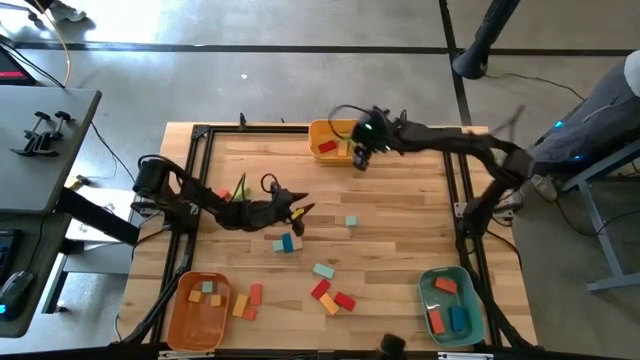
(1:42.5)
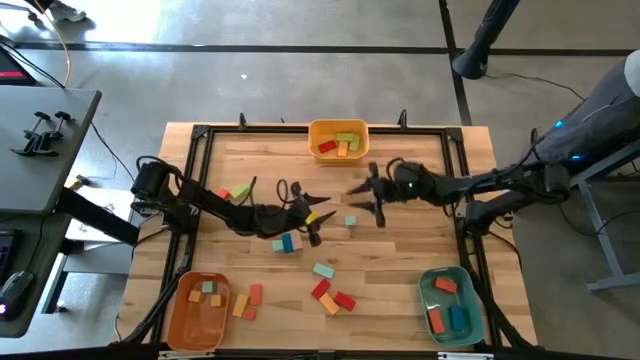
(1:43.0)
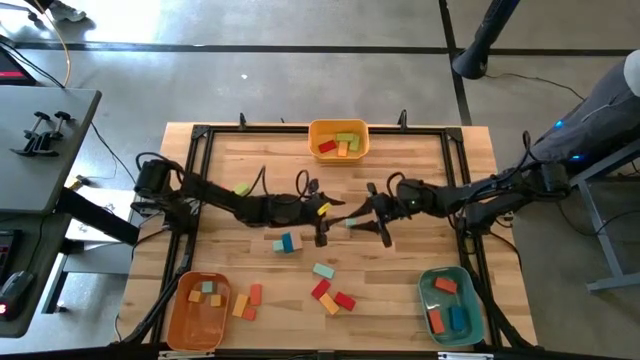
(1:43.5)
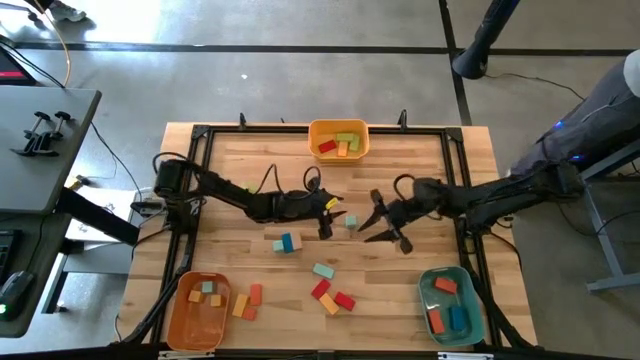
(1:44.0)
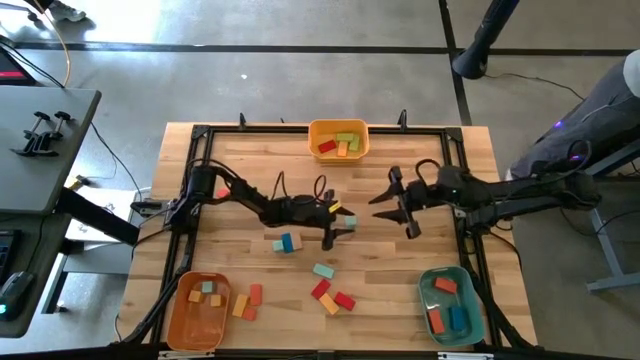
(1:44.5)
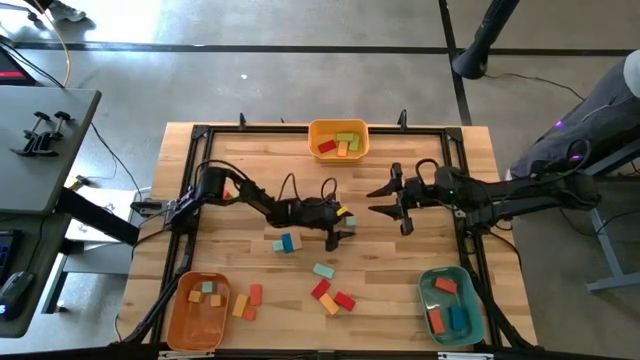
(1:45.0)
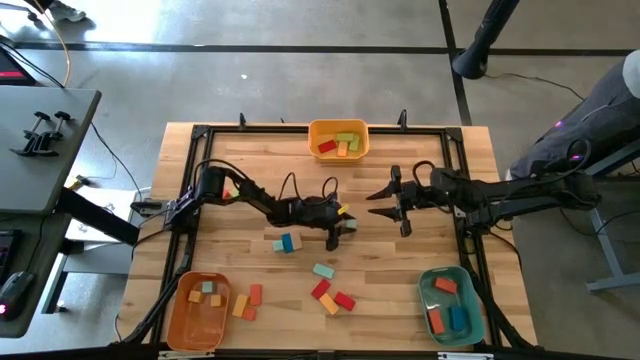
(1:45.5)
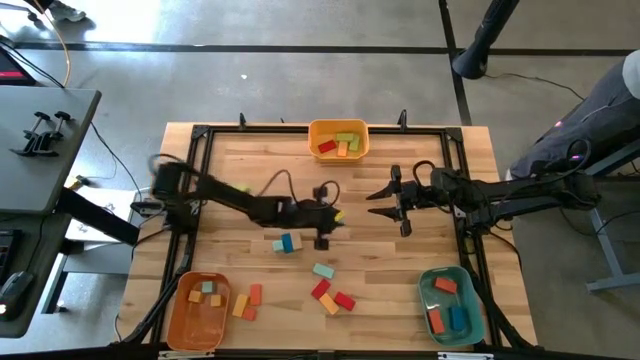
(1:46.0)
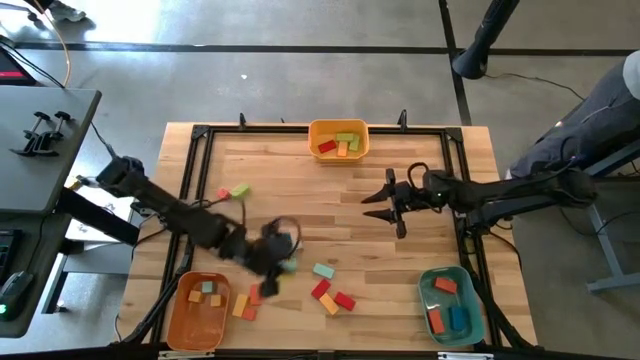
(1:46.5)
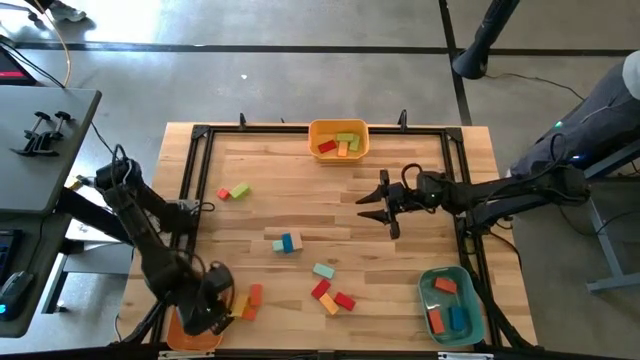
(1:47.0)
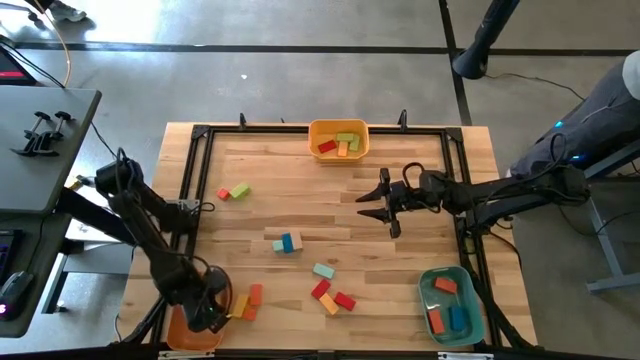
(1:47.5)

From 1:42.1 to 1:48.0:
Task: Sort blocks by size
Put the light blue square block into the orange bin

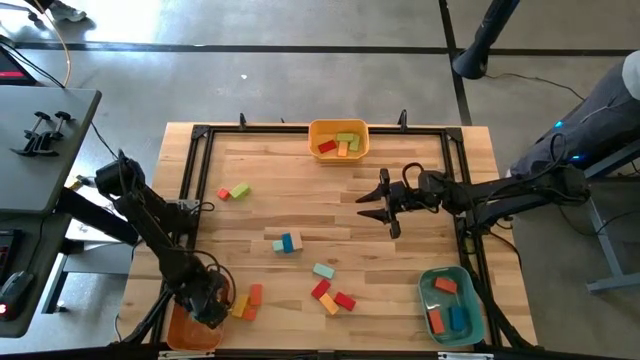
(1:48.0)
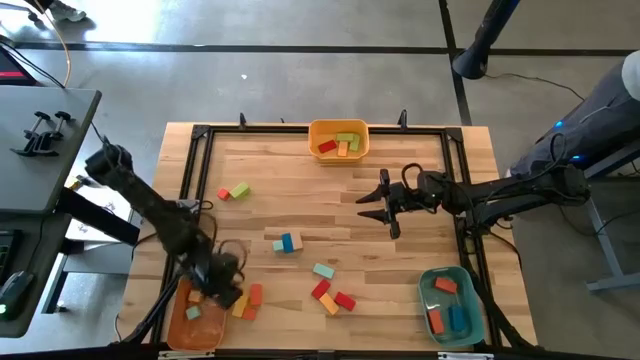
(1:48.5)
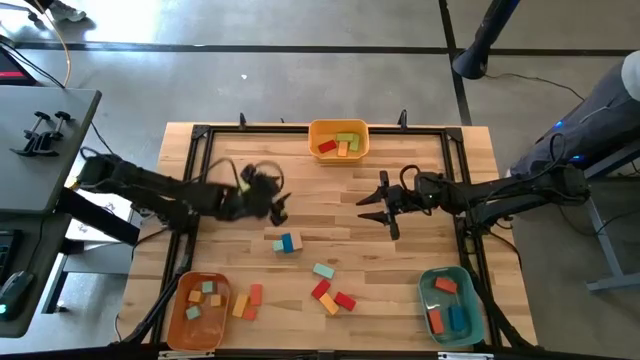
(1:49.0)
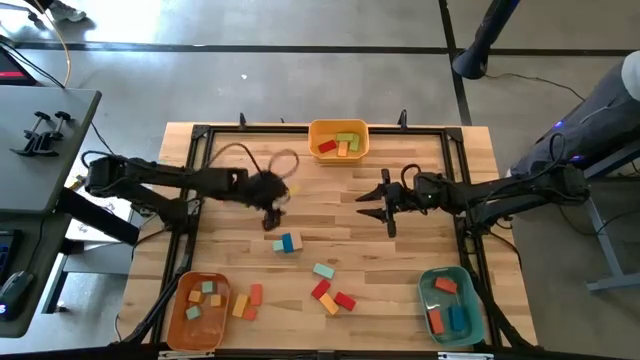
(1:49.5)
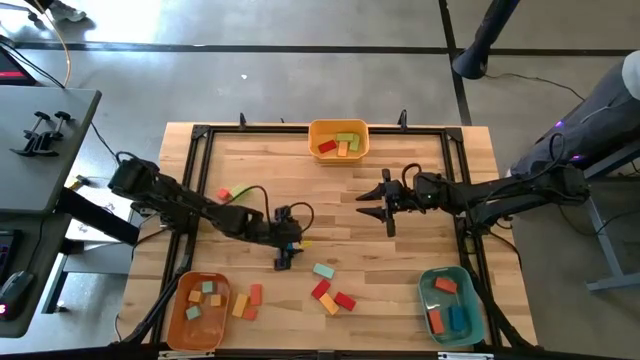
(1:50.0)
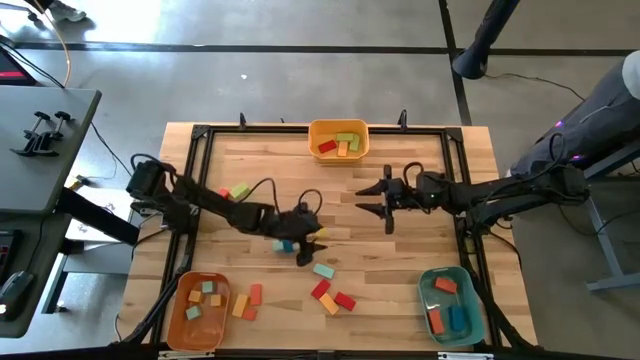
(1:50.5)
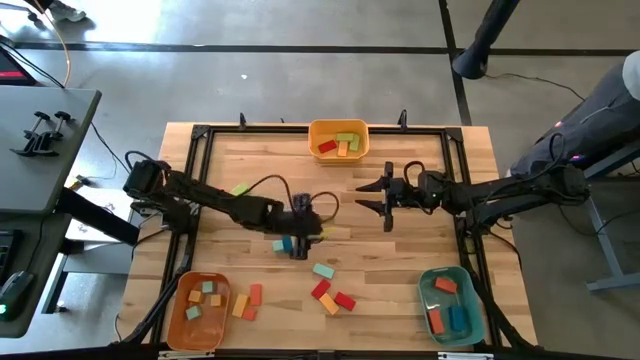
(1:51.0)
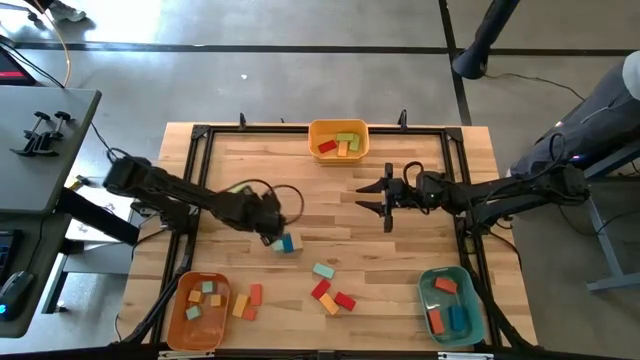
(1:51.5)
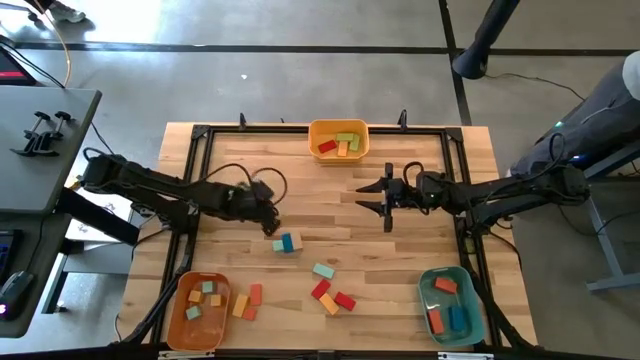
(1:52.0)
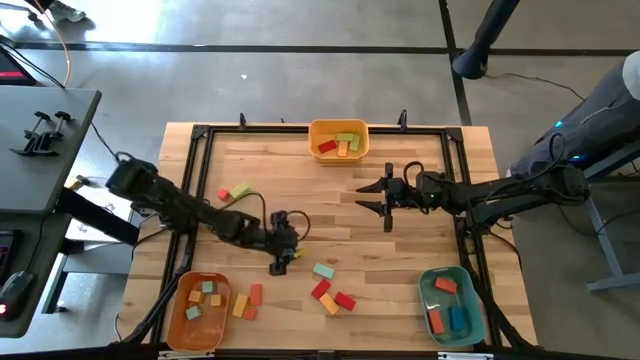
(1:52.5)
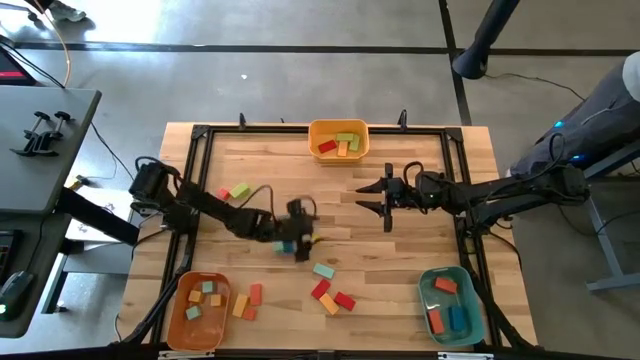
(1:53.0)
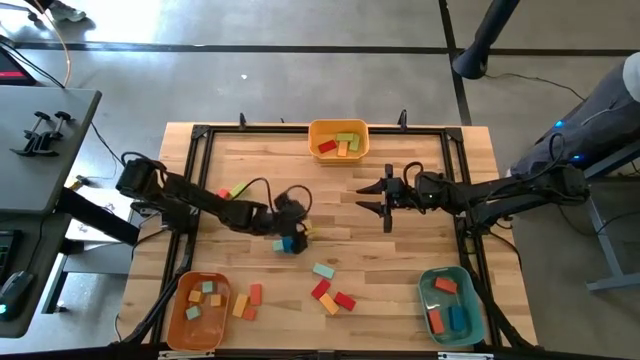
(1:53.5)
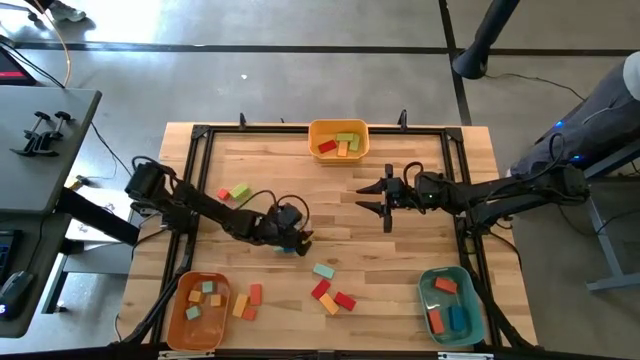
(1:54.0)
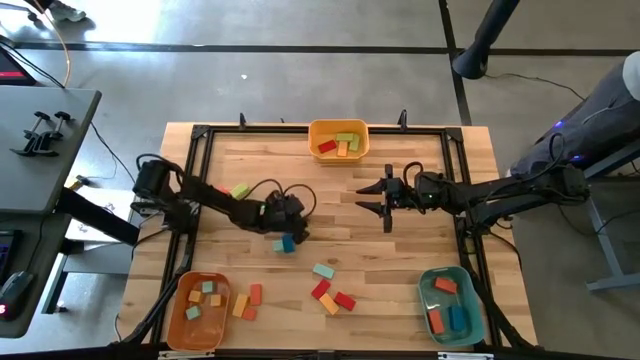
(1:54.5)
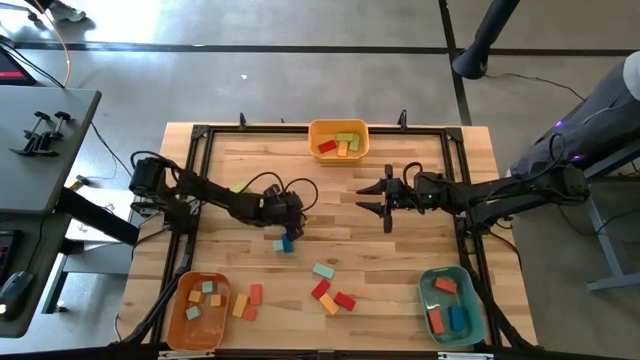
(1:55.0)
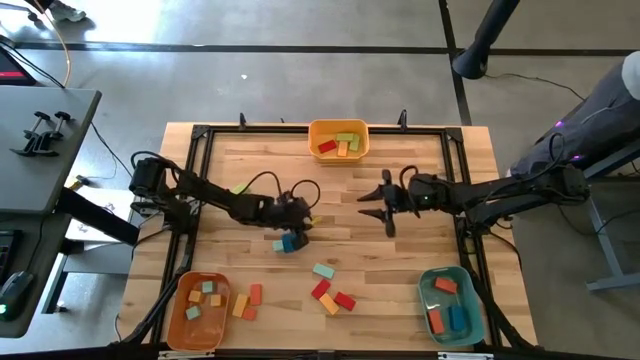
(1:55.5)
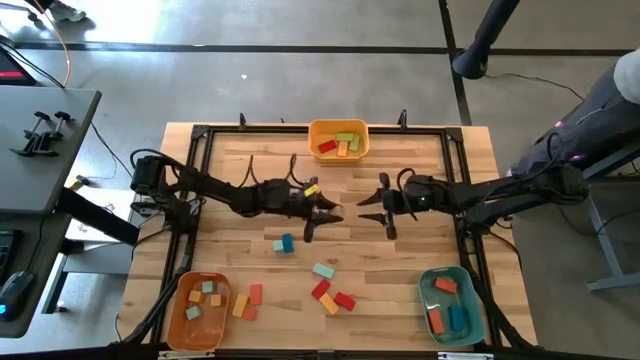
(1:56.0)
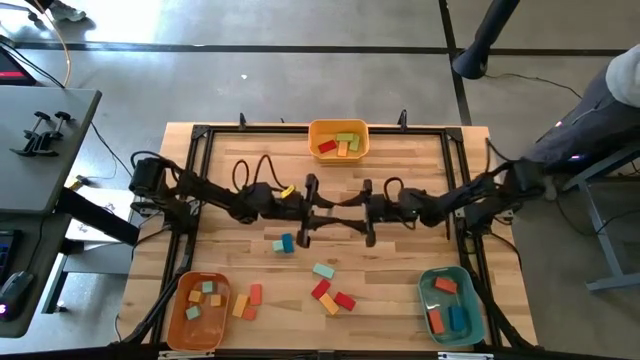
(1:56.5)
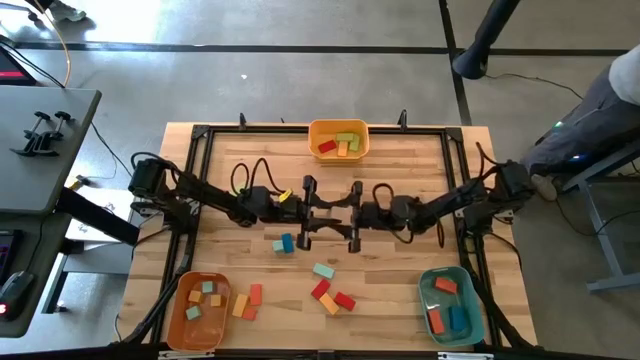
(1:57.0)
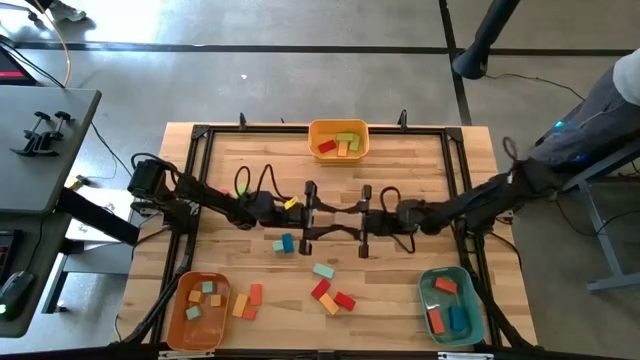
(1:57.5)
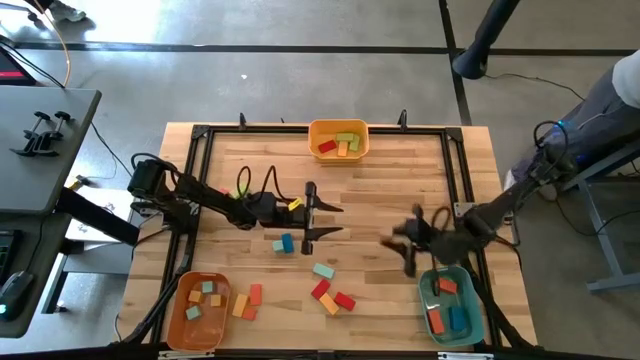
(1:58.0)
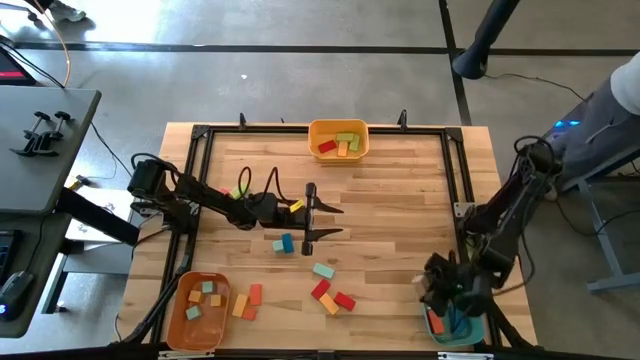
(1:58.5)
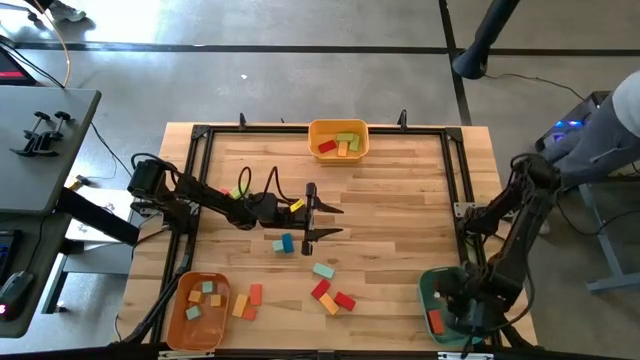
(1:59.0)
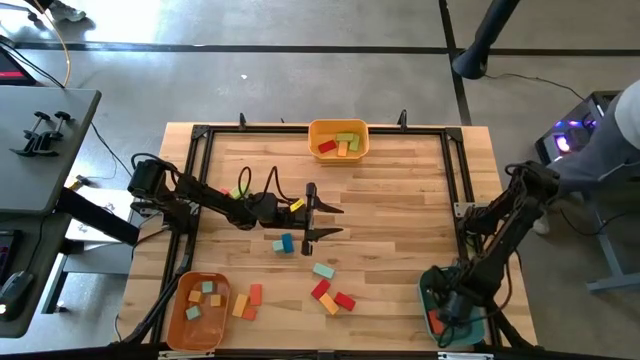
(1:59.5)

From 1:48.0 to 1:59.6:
Put the large brown rectangle block into the green bin

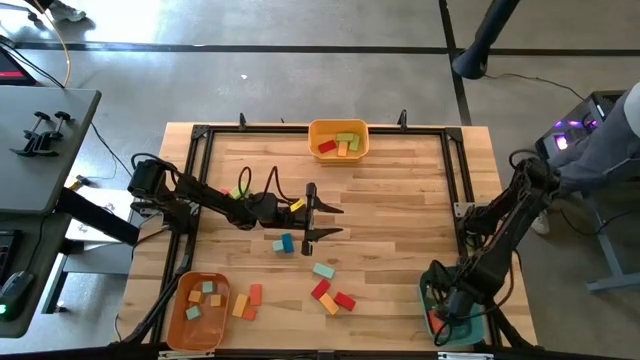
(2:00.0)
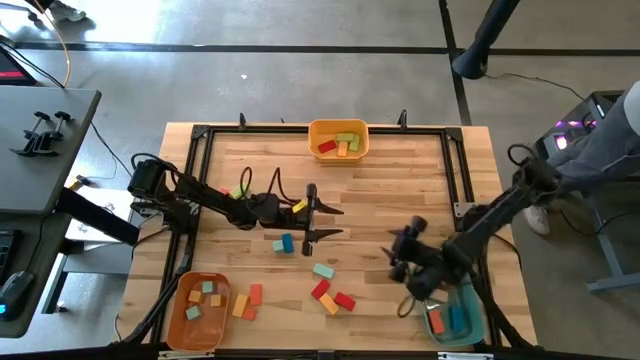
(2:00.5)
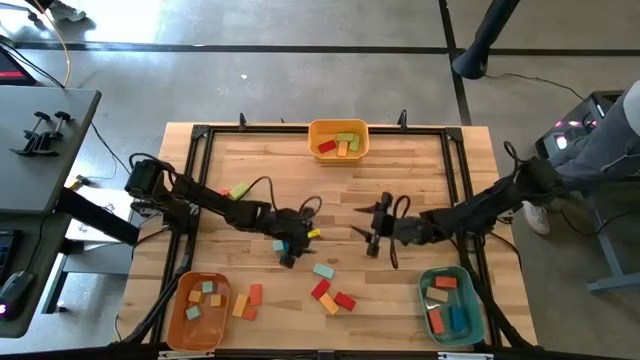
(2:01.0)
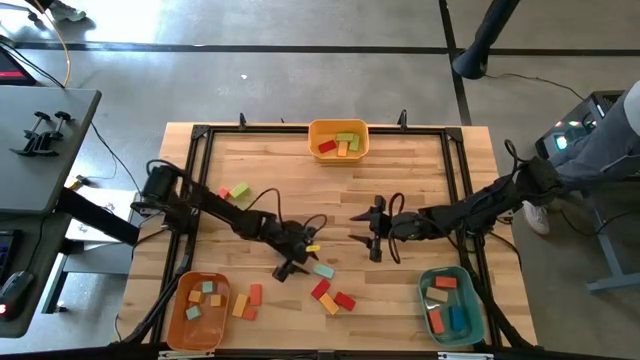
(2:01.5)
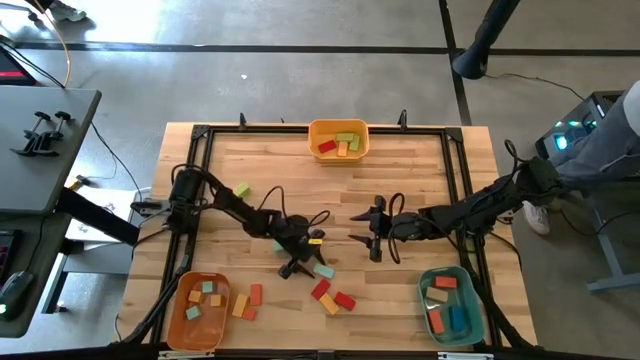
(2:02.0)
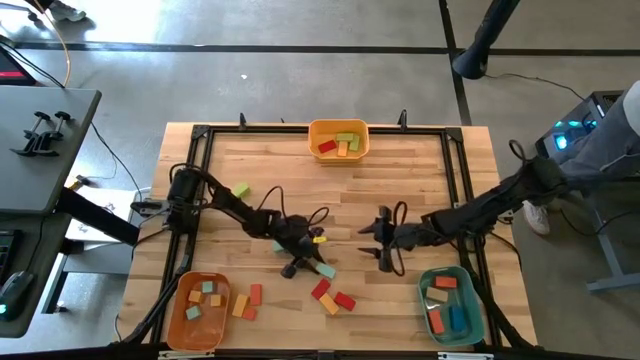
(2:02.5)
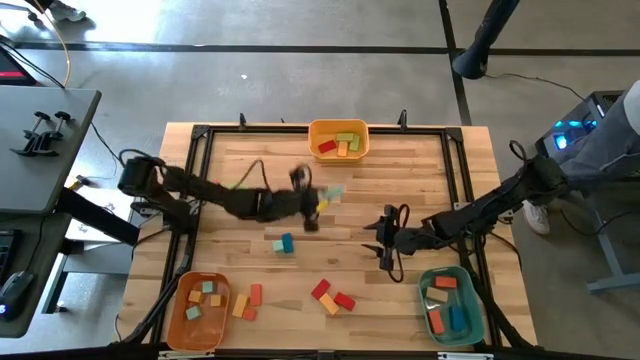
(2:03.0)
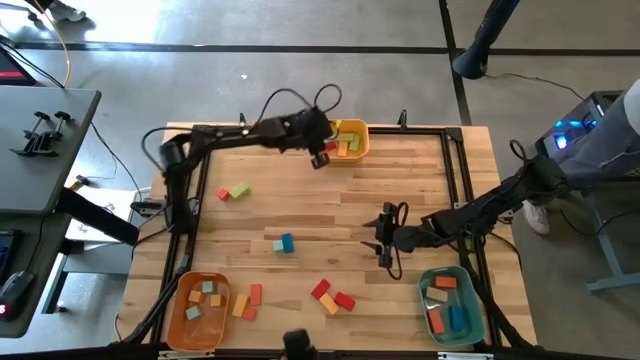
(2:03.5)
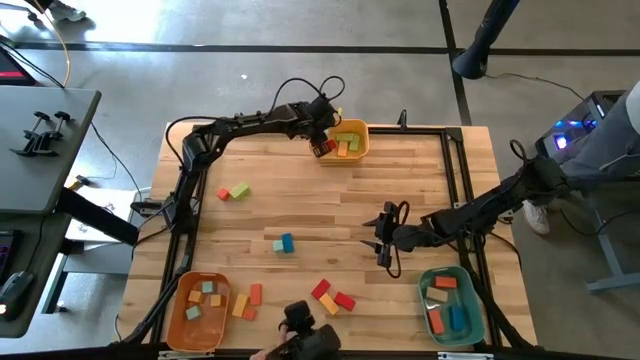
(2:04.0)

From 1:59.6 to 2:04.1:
Put the small light blue rectangle block into the yellow bin
